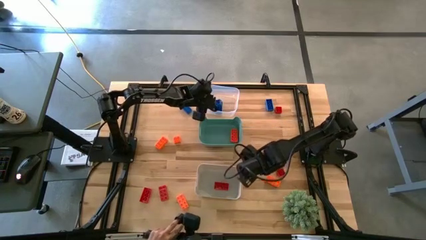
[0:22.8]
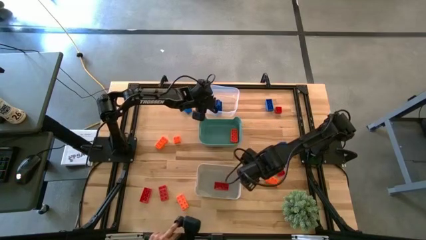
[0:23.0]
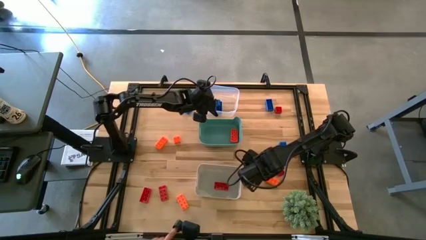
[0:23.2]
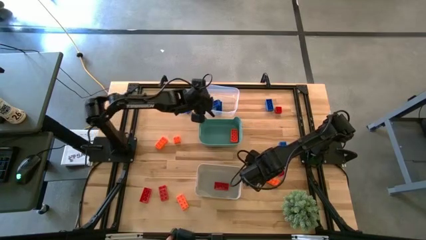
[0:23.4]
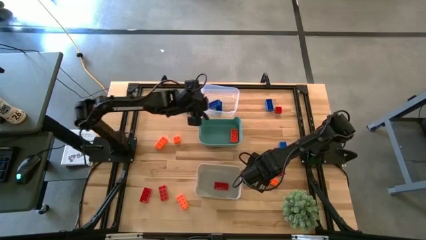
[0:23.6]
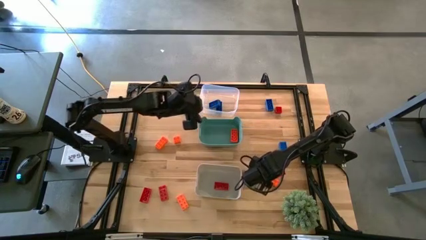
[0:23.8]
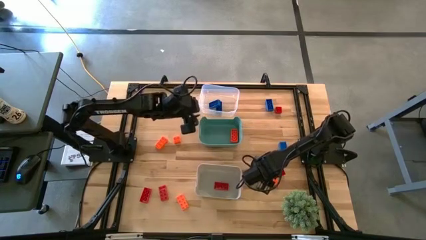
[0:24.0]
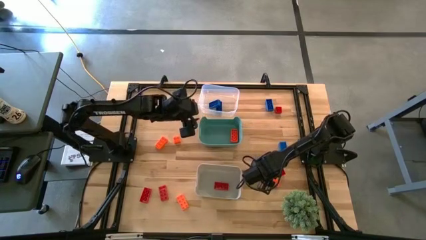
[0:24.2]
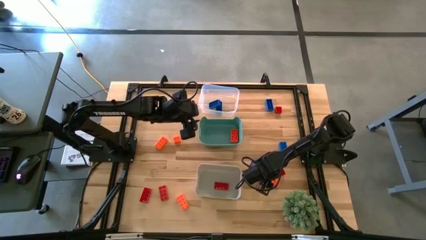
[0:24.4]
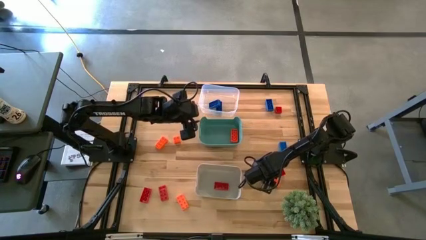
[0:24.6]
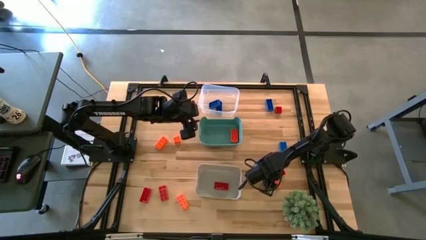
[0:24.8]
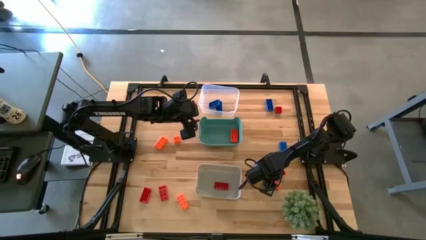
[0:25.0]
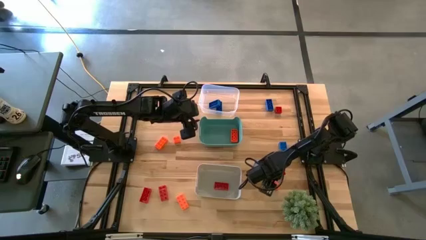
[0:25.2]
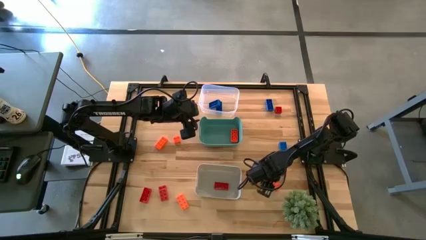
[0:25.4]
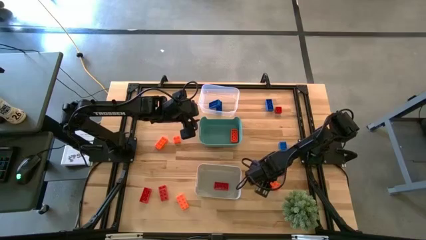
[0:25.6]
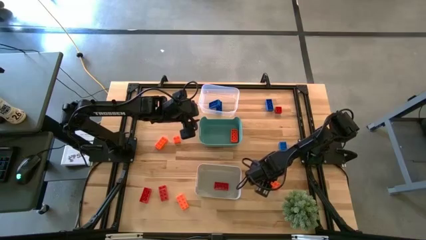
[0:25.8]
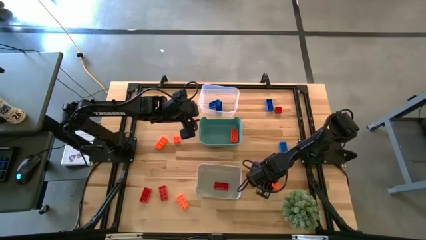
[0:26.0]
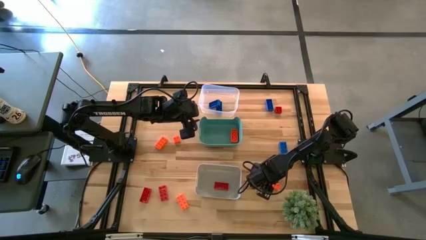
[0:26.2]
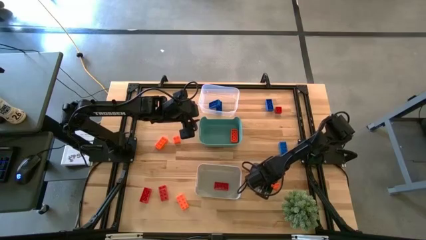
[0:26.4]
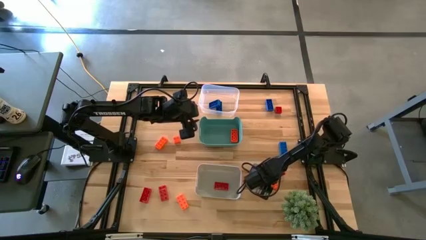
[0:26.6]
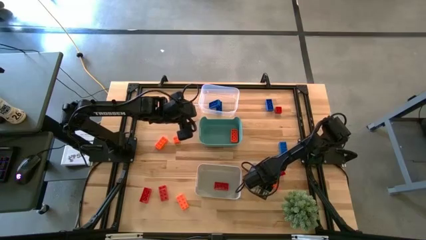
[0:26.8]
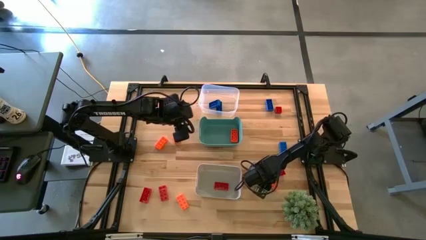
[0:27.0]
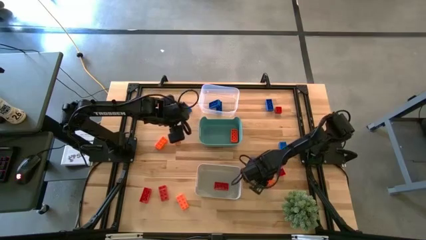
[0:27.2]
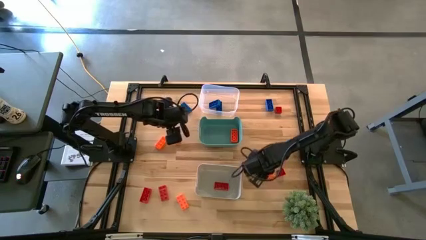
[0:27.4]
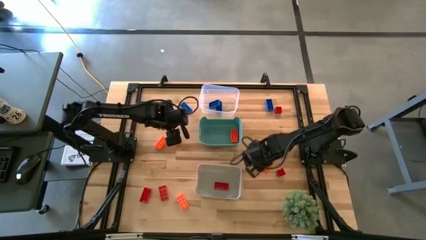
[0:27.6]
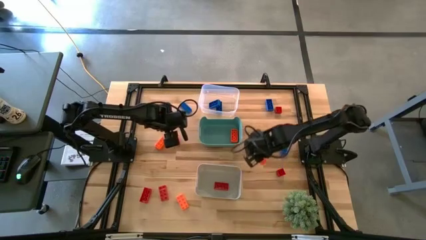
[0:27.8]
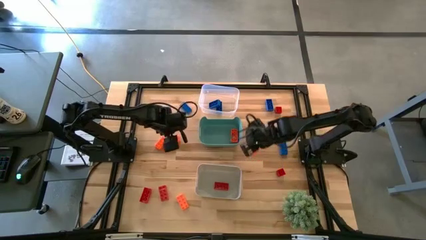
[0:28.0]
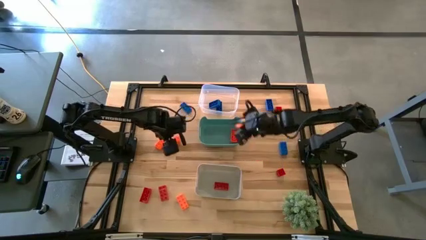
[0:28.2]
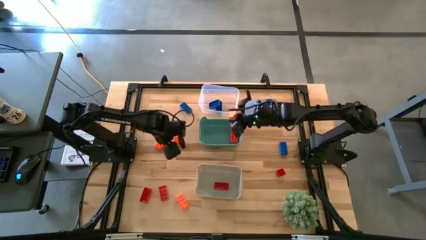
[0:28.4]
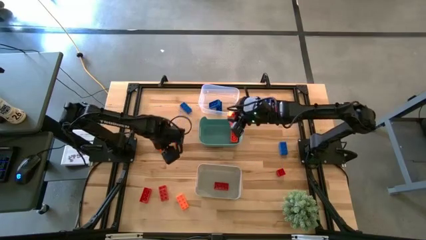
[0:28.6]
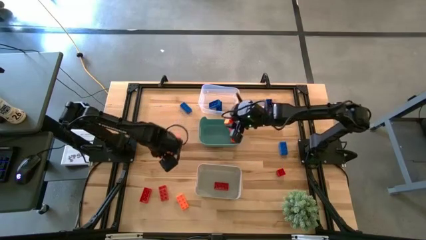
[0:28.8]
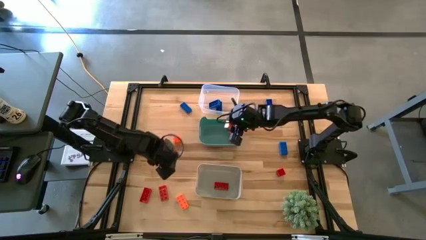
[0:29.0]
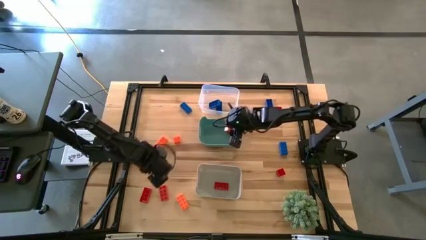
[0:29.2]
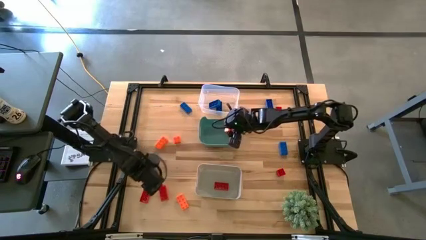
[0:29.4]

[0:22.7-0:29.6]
Task: Sort & place blocks by color
Put the orange game piece into the green bin

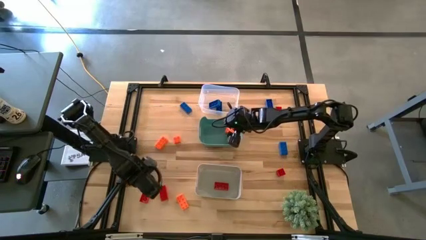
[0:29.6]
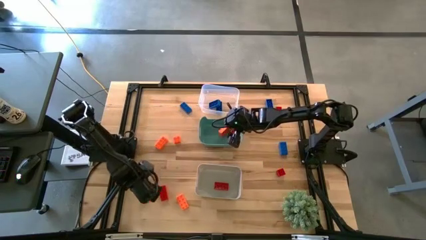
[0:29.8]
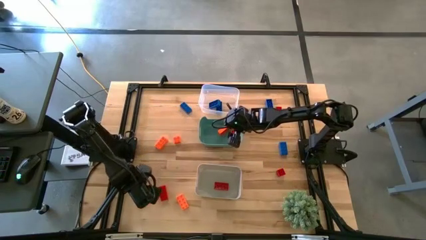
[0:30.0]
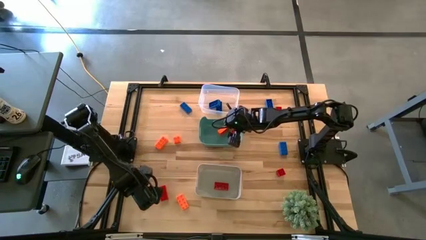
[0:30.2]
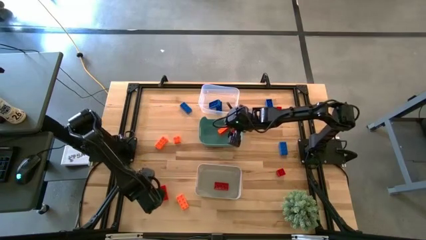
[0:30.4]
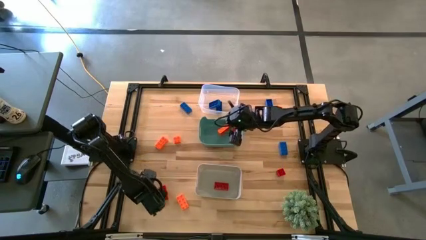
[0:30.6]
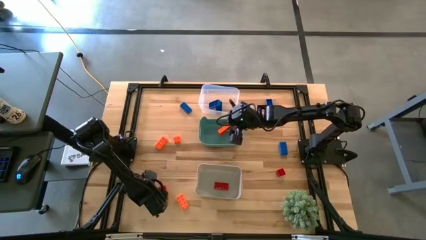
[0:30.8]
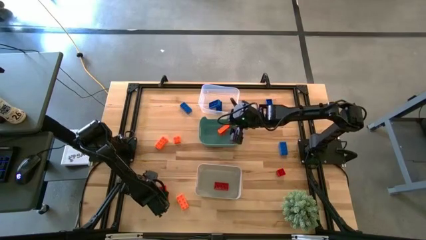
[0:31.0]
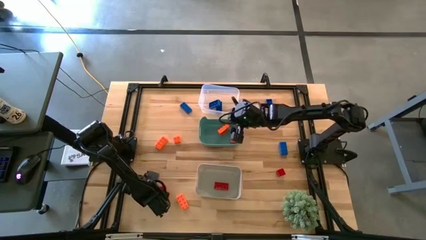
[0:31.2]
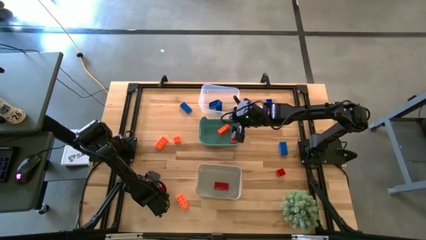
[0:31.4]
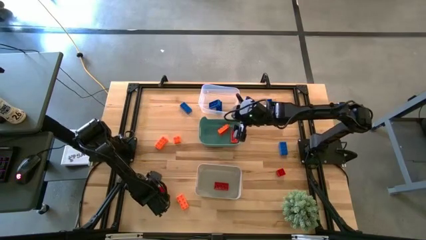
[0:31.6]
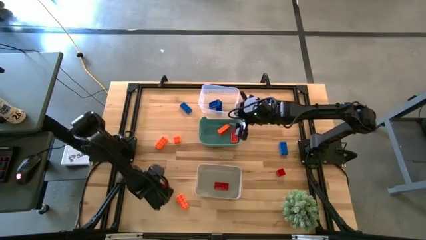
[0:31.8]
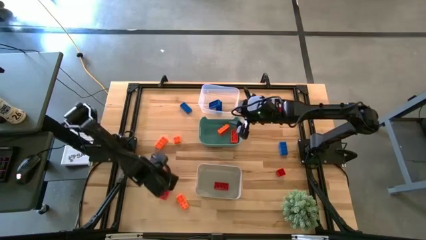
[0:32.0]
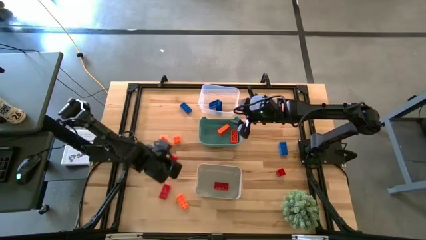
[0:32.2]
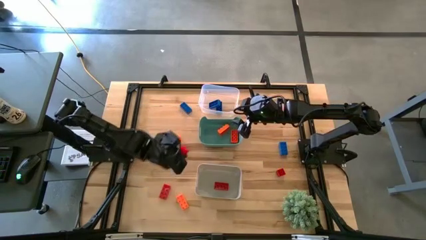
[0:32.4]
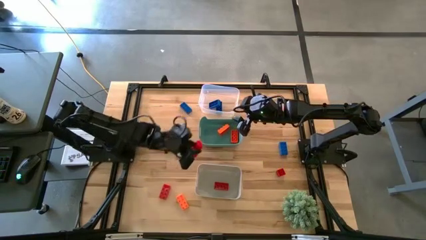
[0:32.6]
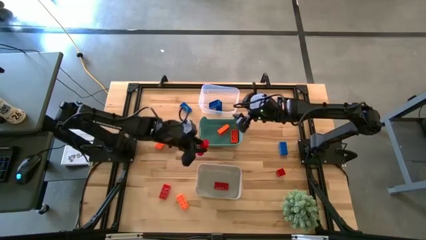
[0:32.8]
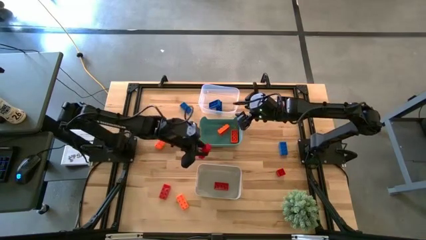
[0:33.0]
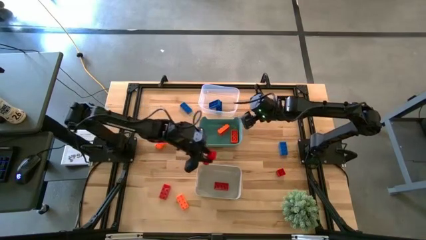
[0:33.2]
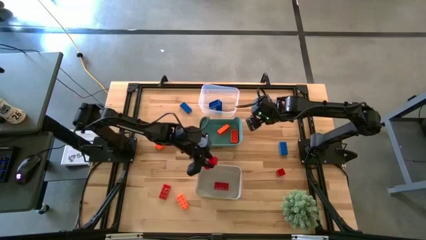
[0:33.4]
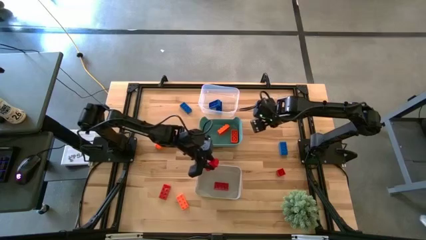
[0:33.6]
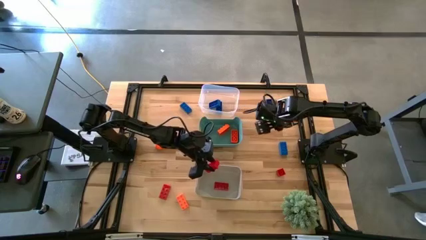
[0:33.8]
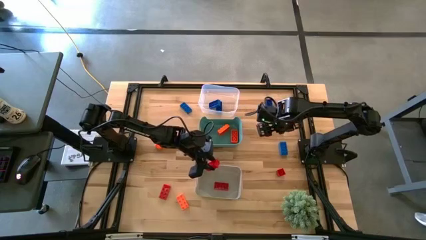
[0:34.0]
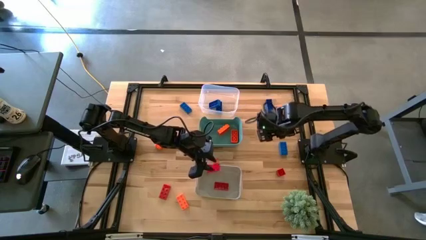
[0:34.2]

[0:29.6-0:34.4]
Put the red game piece into the white bin

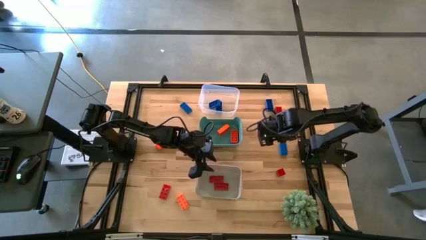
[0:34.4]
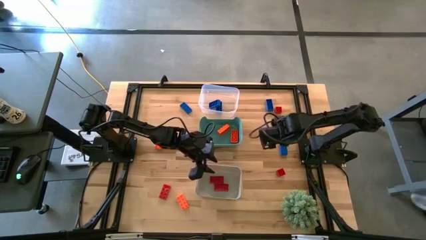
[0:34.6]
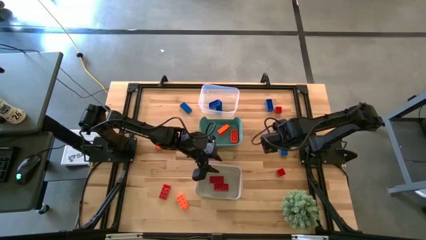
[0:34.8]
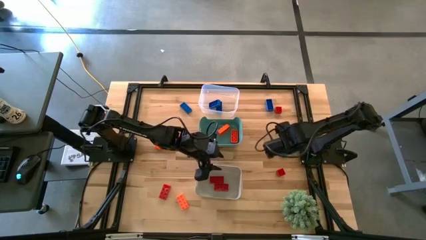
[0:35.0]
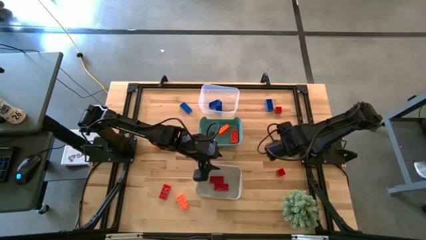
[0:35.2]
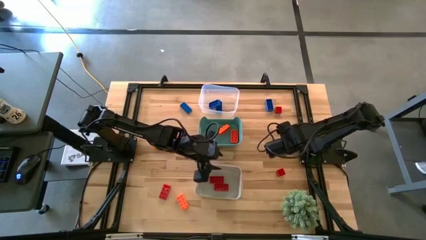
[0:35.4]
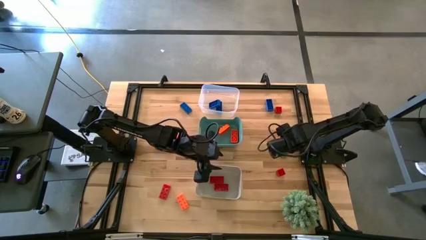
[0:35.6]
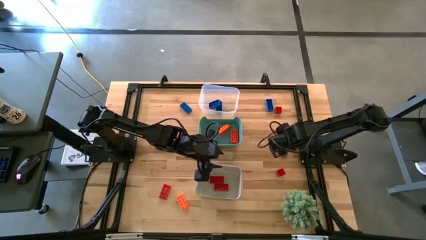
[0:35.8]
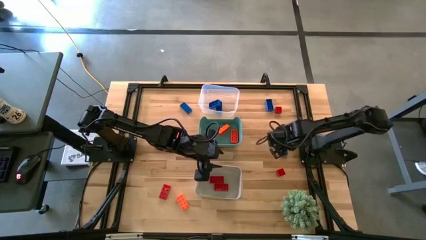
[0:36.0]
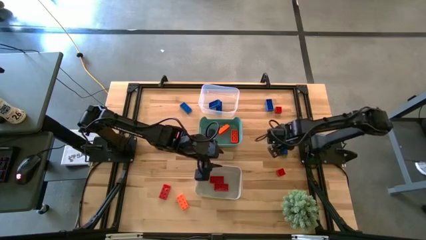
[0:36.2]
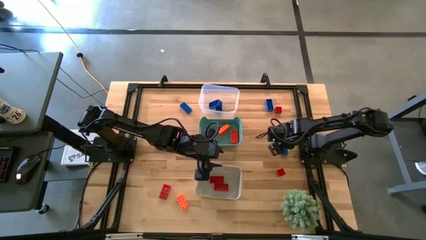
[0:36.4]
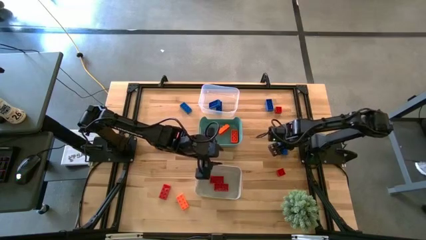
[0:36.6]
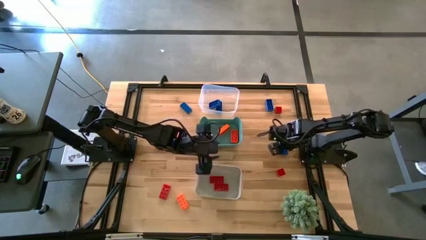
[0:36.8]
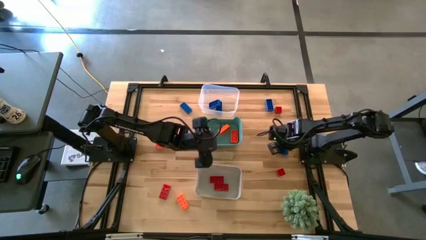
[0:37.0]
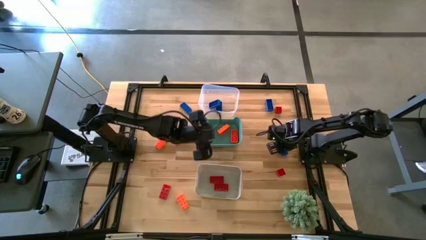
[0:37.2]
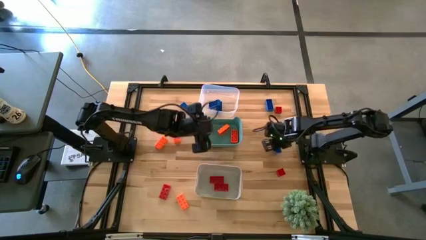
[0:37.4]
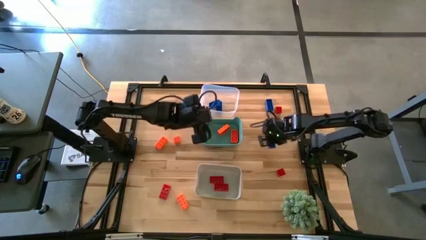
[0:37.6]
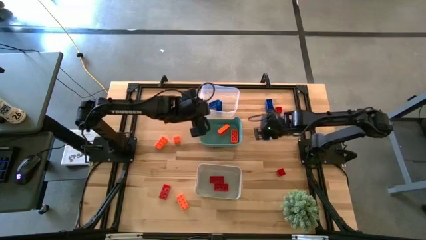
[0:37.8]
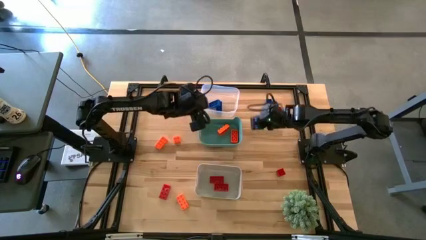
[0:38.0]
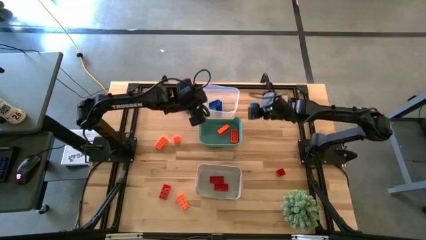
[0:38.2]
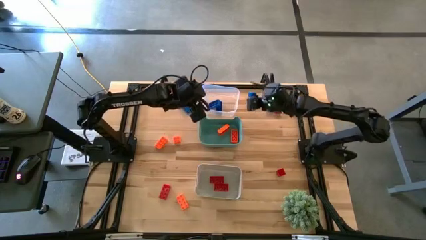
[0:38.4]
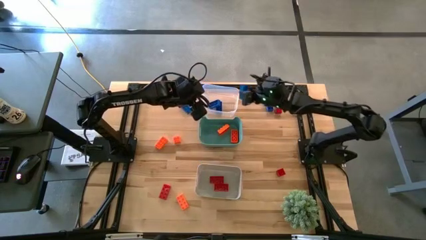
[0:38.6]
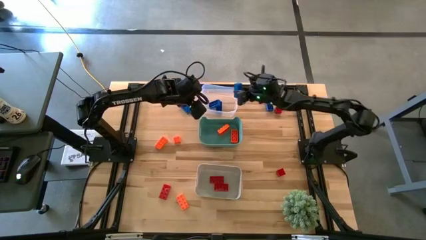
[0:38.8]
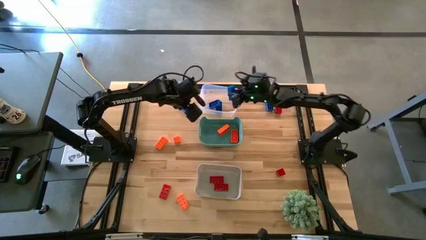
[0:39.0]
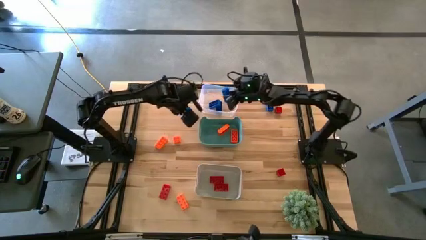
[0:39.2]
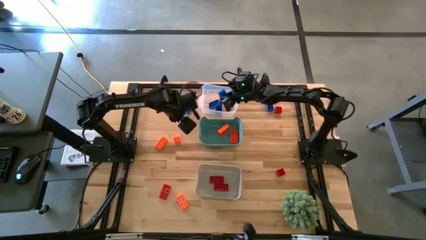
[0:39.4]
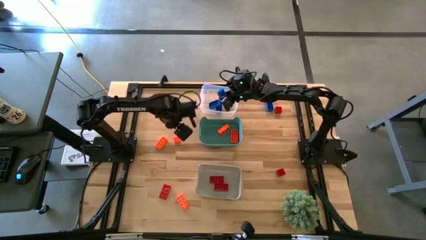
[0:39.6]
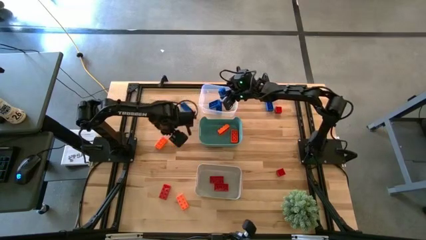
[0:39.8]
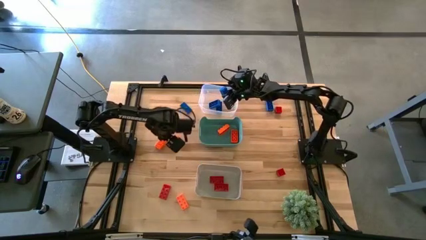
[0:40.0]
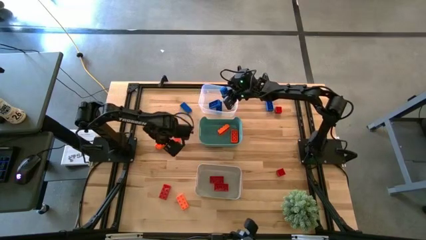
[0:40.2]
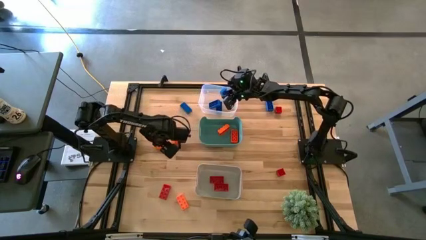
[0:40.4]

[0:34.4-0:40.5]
Put the blue game piece into the transparent bin
